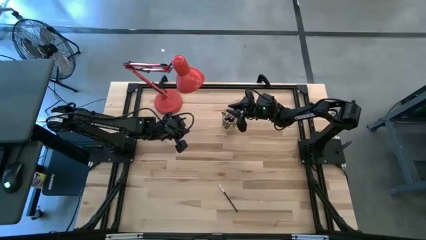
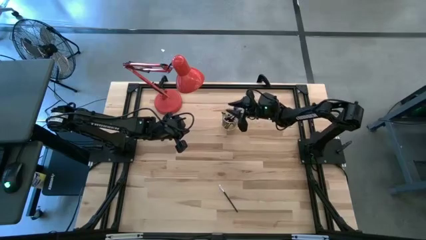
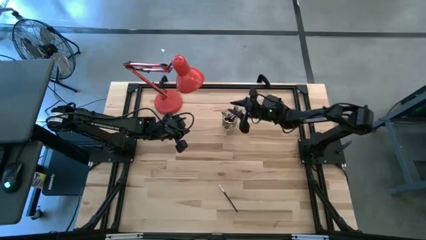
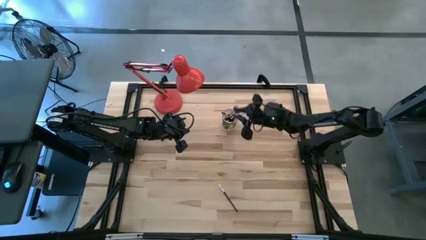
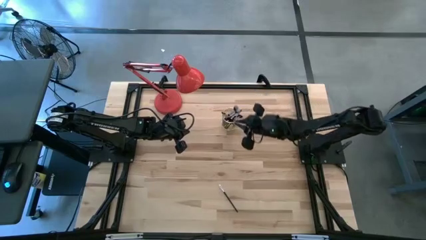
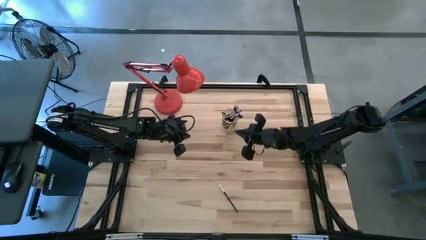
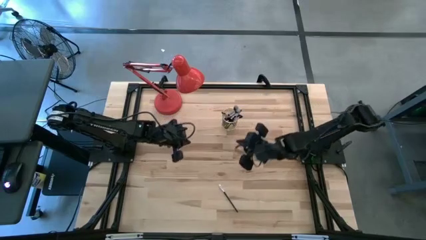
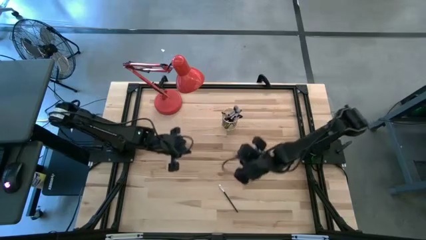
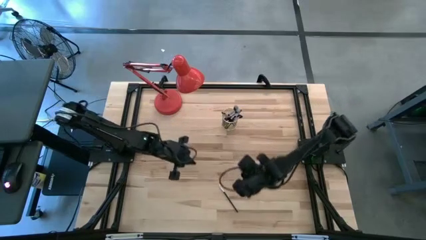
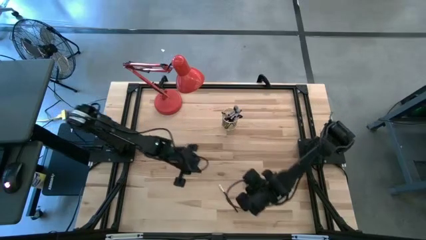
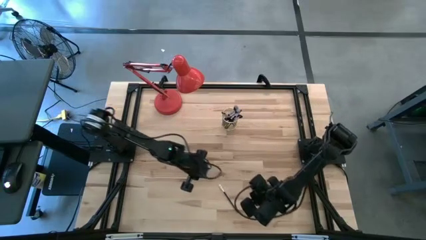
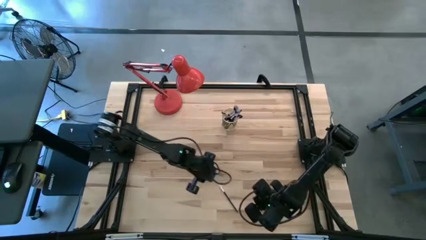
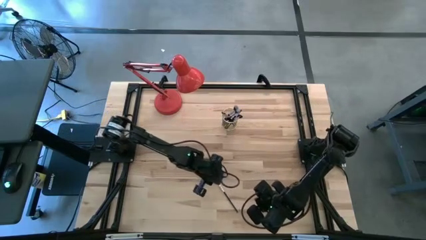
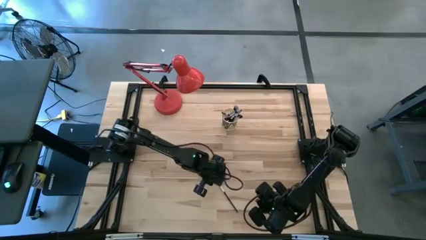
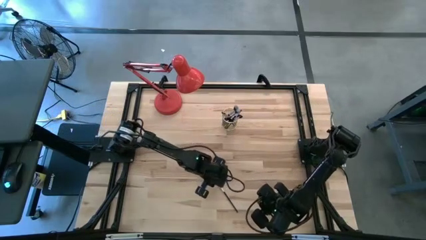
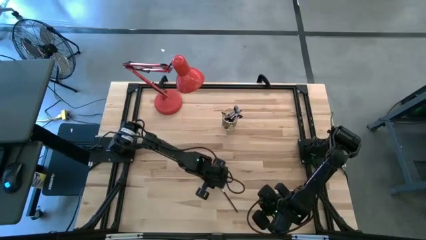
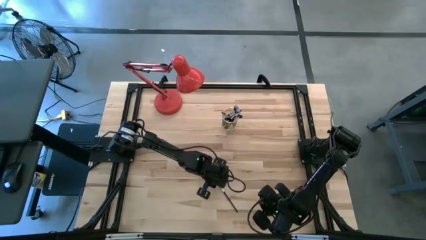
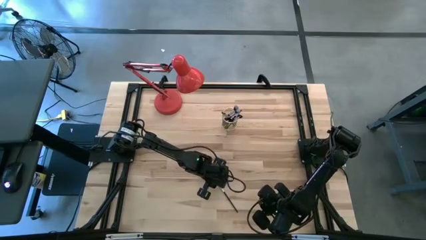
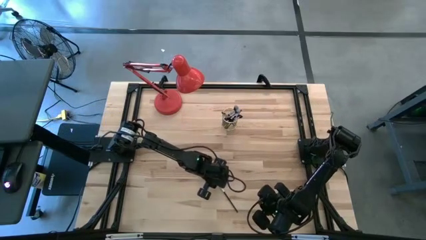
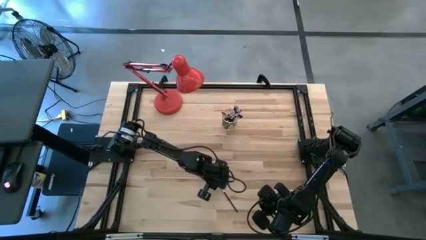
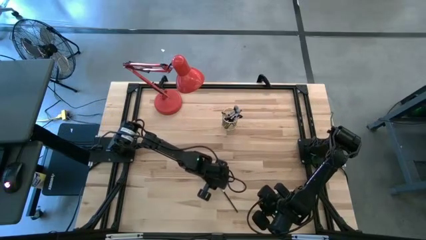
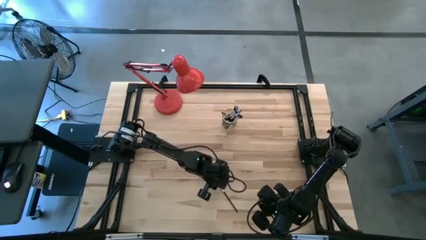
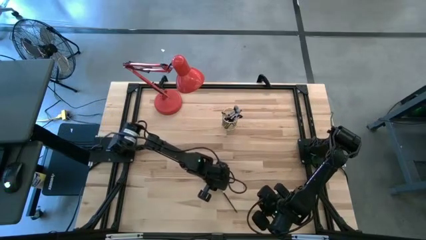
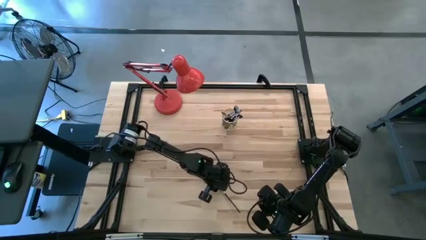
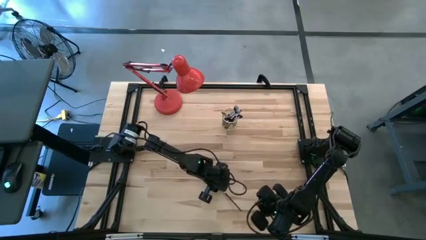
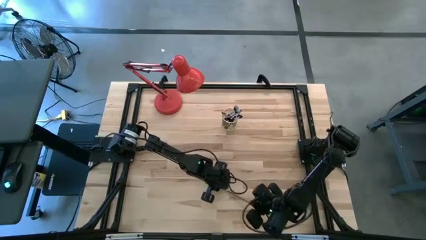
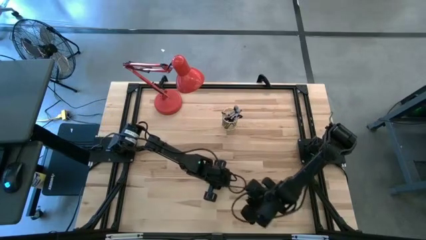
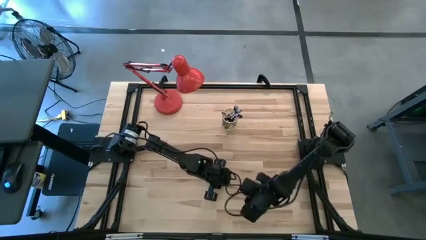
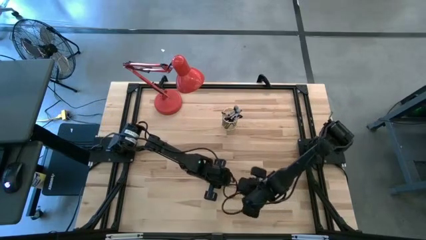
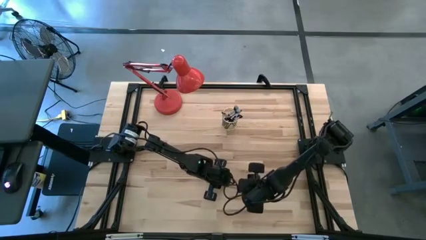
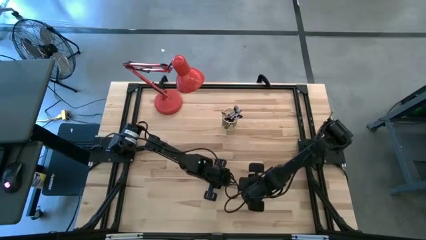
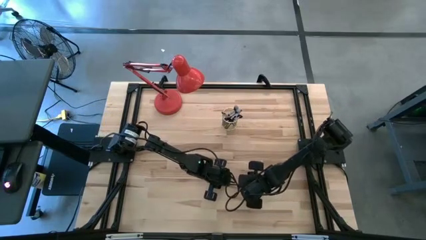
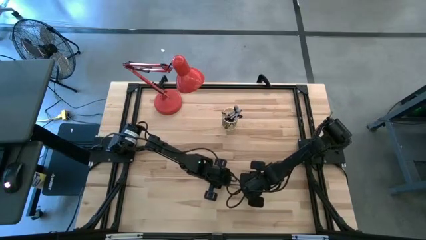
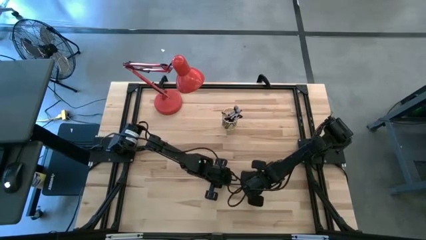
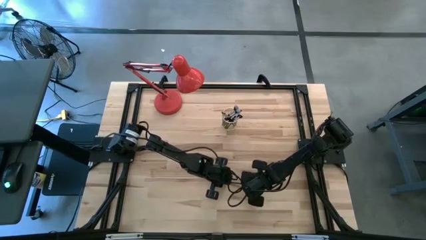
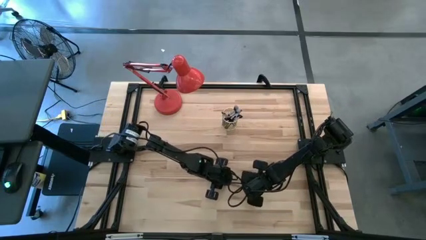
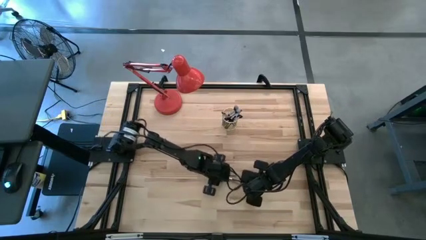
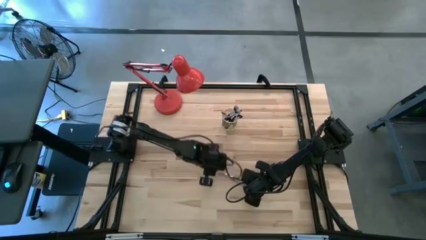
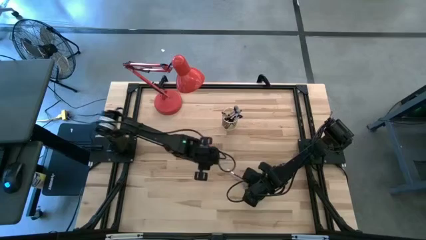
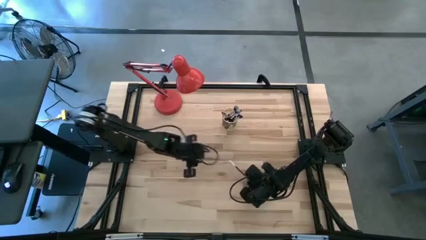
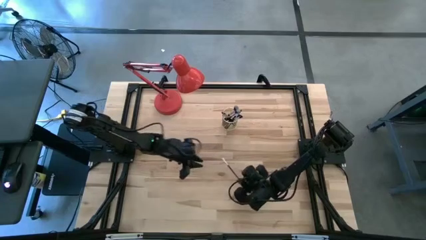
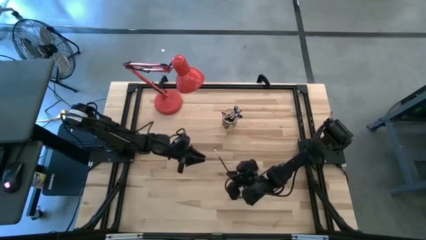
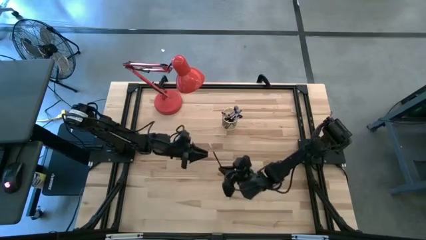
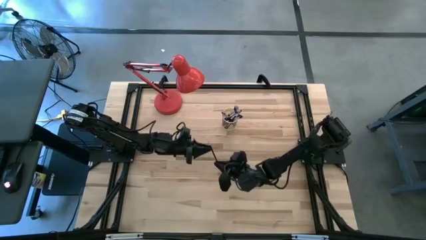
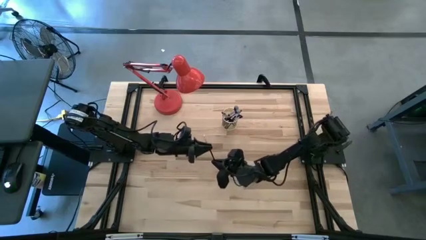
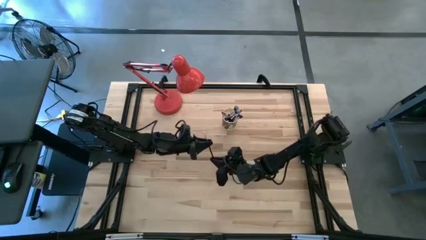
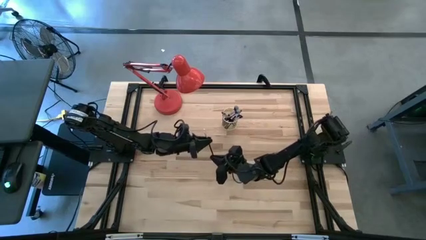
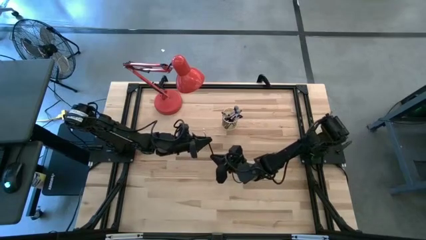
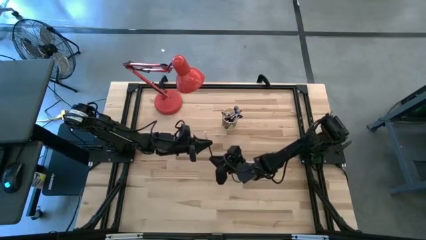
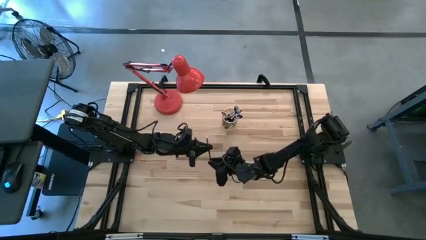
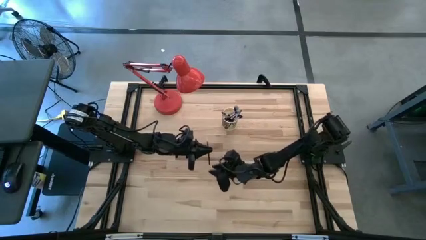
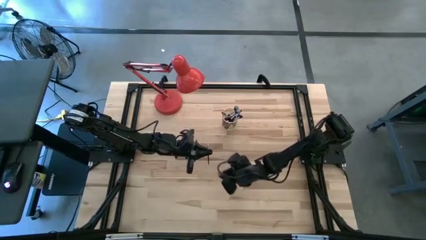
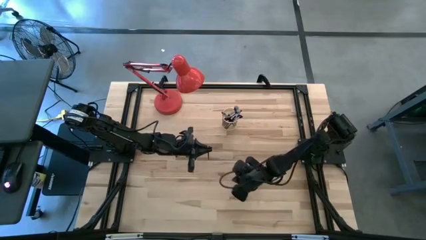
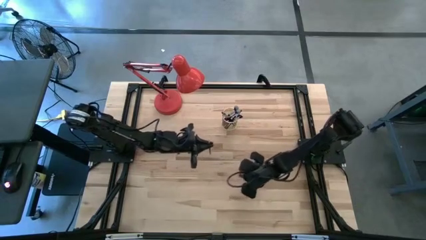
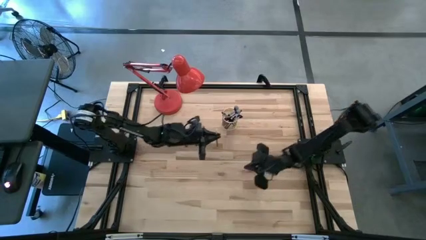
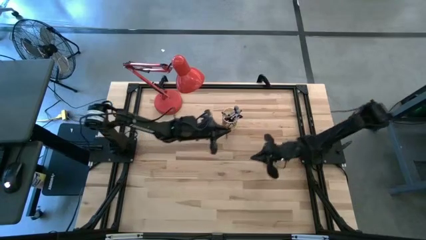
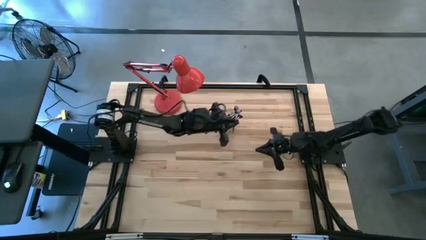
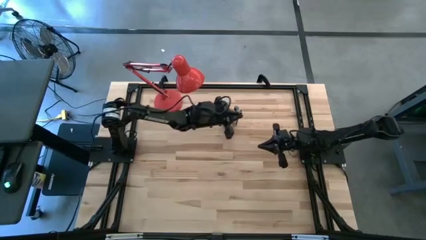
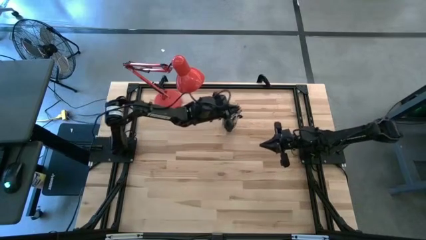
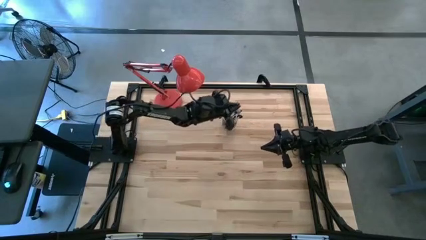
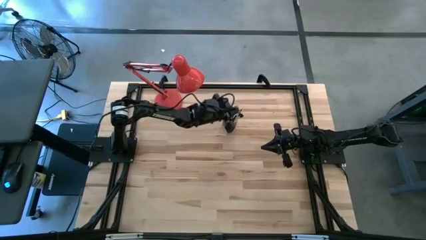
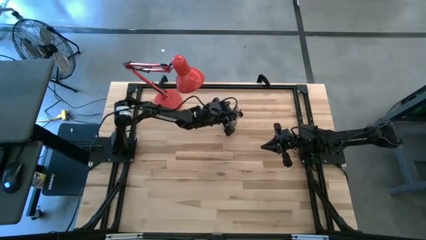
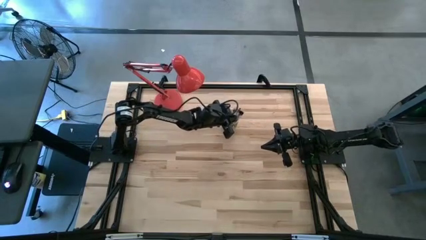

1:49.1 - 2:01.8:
Task: Put items in baskets/containers
Put the black eyeshadow brush into the yellow container

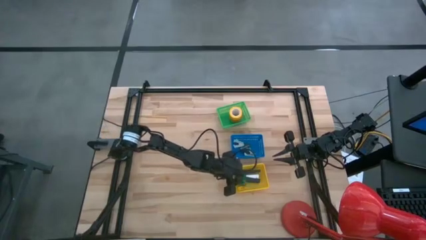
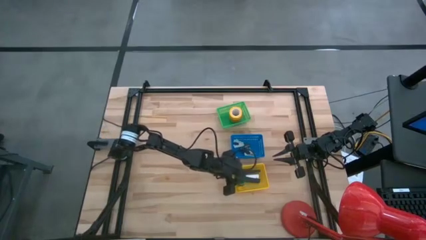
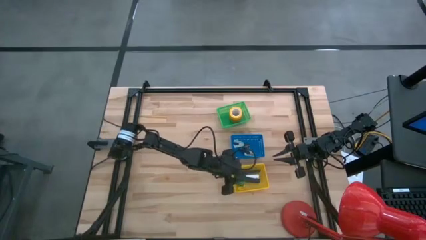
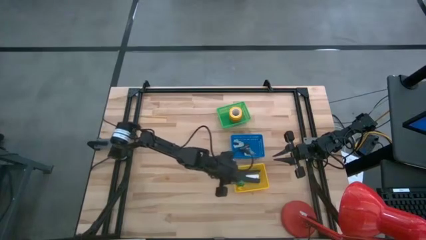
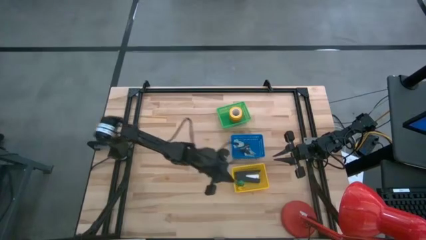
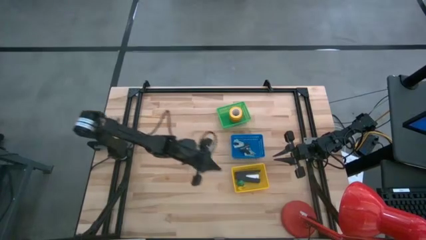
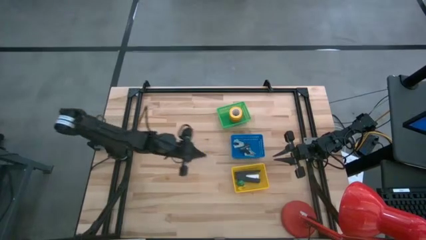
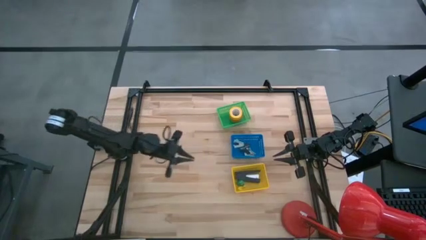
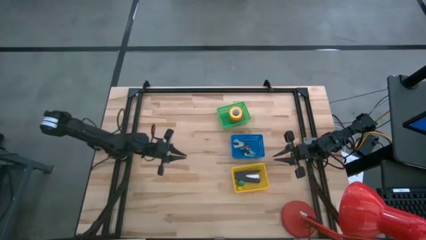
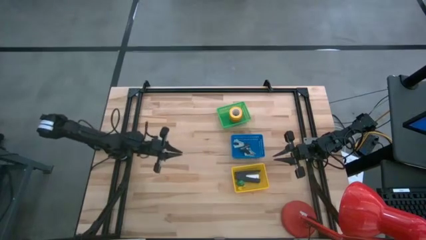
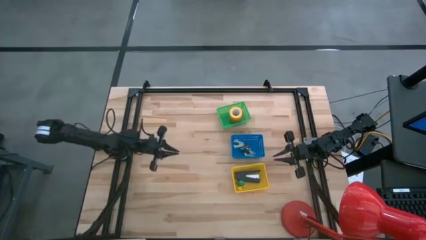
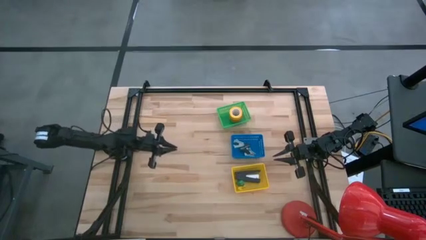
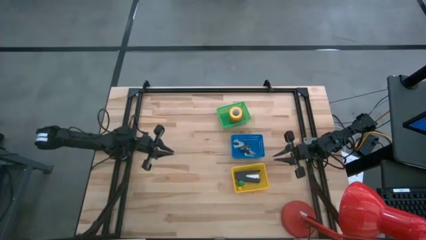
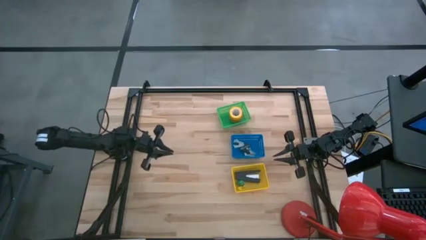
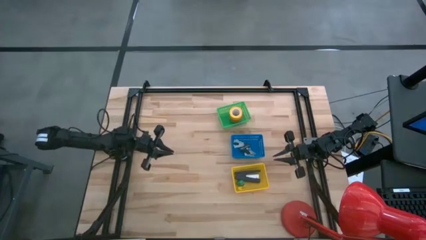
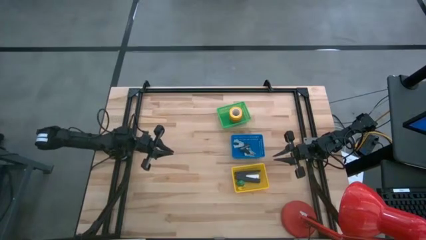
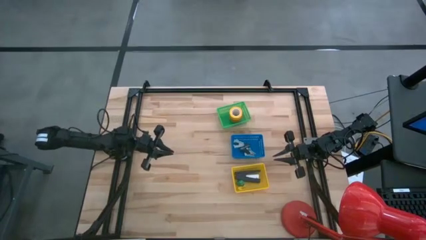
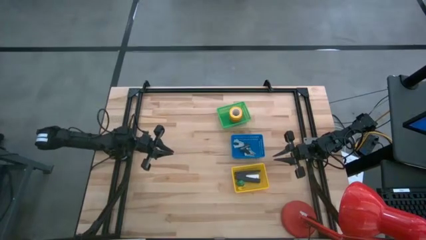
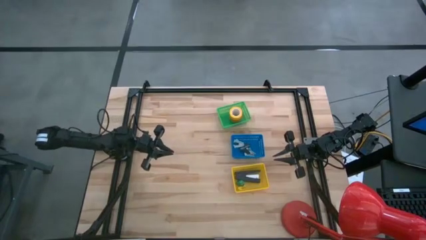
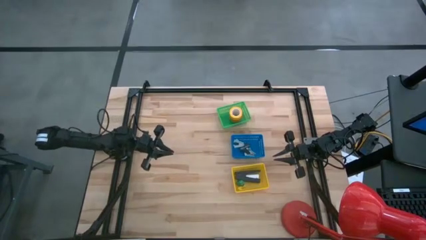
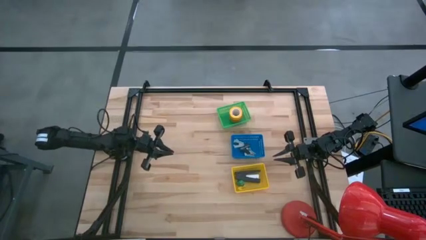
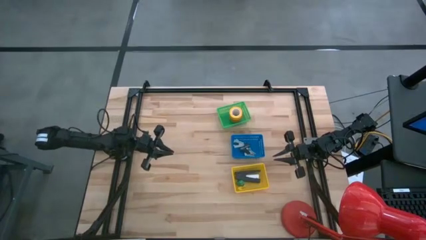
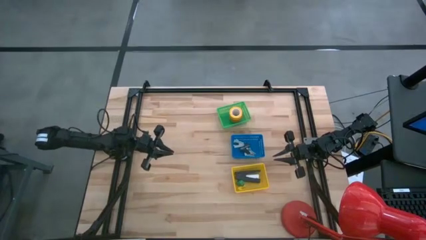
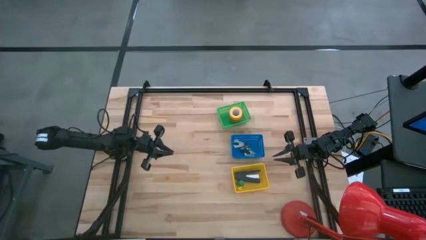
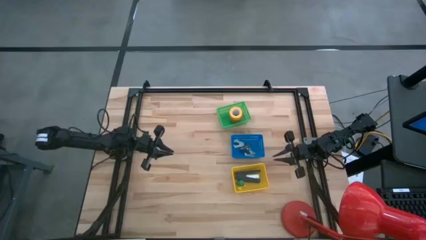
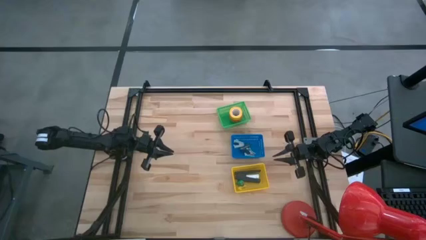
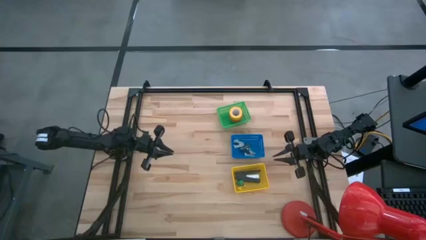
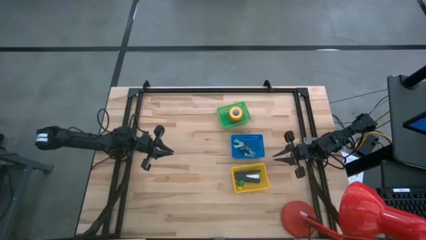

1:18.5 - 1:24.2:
Task: Pick and place Stapler, Stapler remover, tape
Return to Home Position
